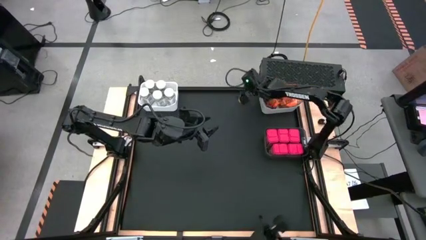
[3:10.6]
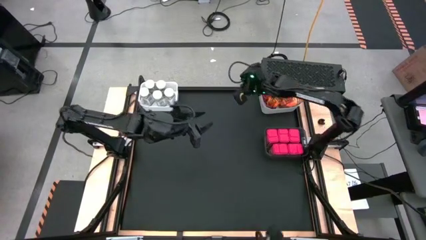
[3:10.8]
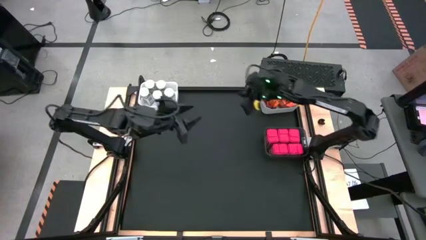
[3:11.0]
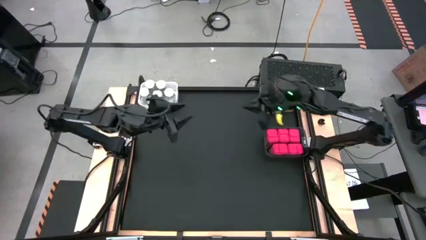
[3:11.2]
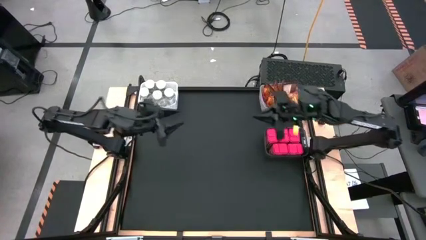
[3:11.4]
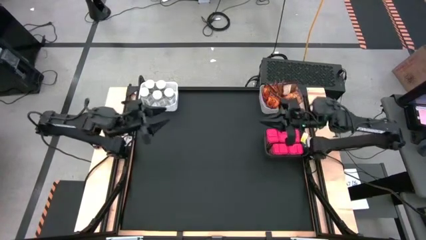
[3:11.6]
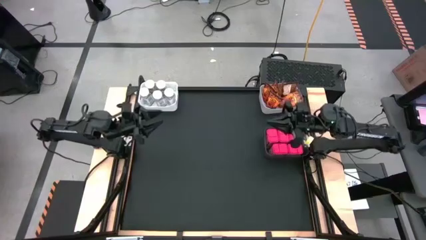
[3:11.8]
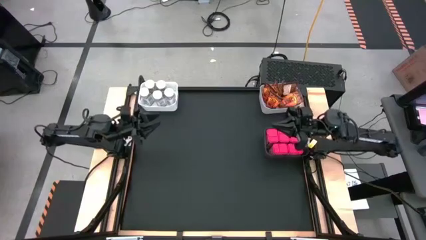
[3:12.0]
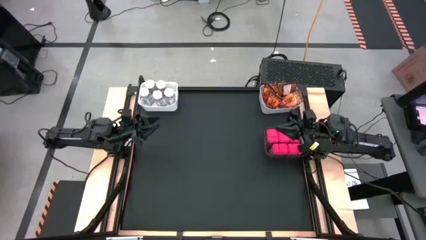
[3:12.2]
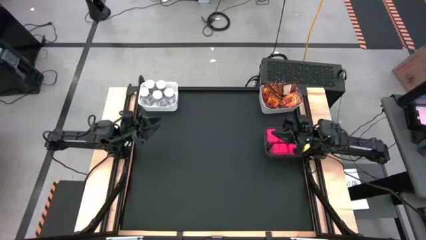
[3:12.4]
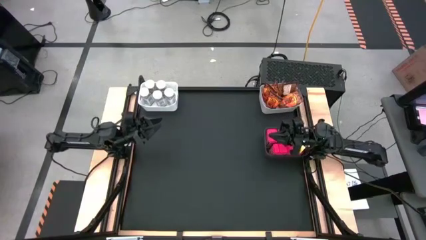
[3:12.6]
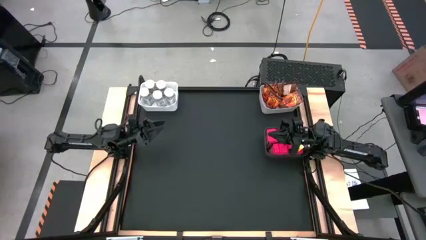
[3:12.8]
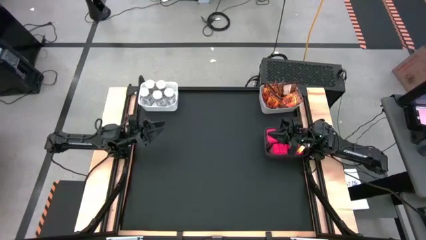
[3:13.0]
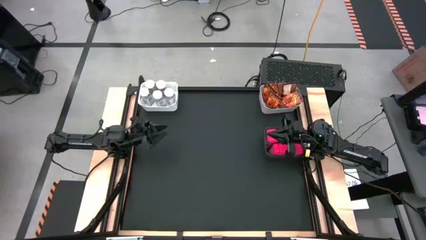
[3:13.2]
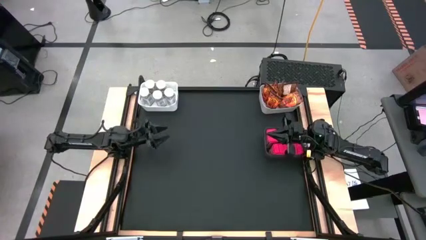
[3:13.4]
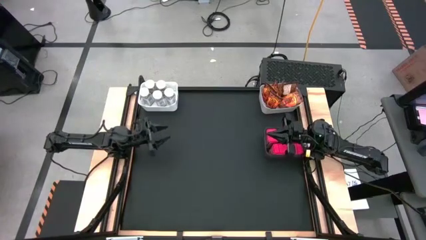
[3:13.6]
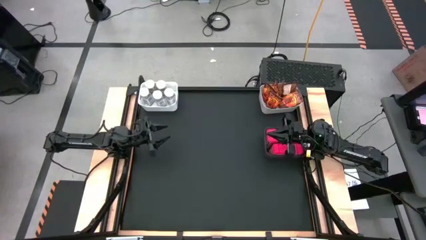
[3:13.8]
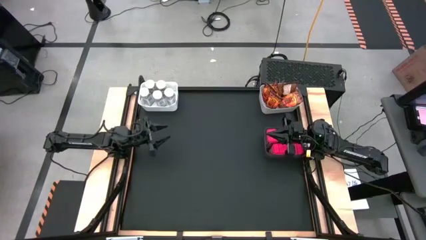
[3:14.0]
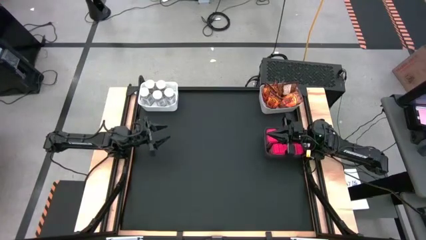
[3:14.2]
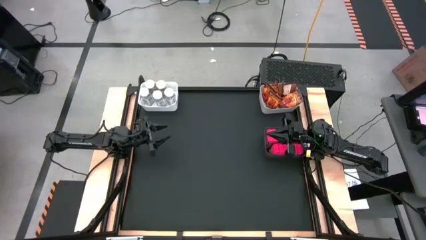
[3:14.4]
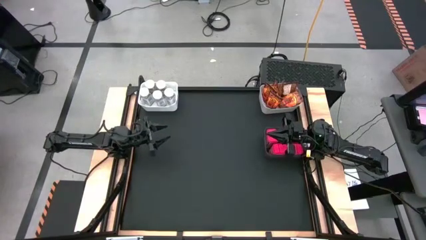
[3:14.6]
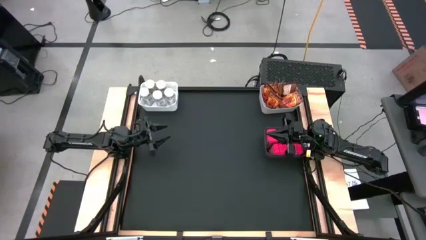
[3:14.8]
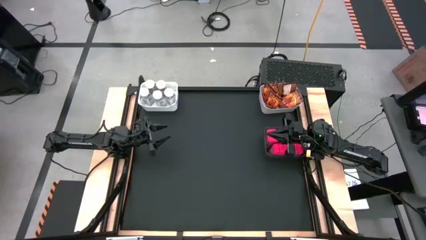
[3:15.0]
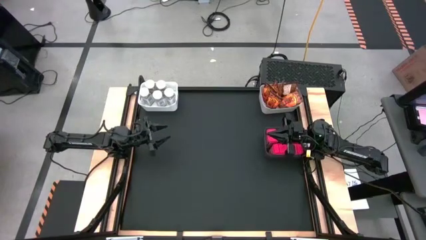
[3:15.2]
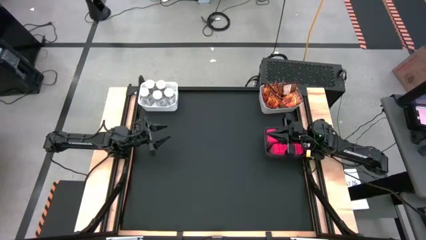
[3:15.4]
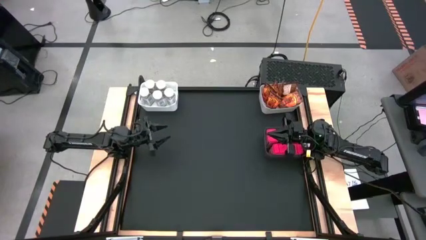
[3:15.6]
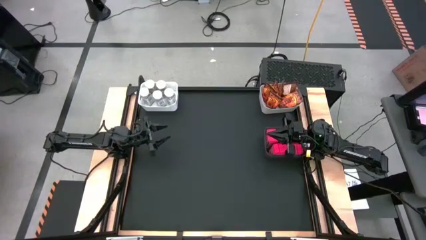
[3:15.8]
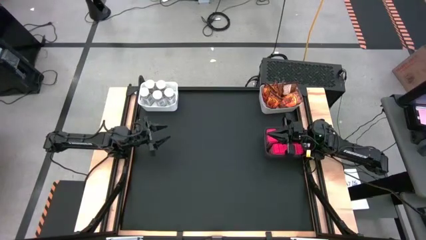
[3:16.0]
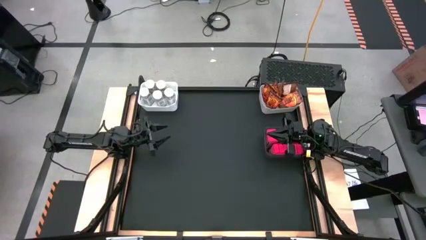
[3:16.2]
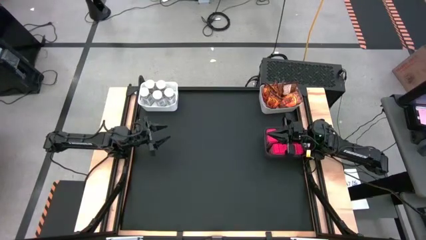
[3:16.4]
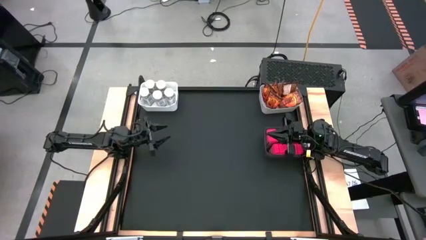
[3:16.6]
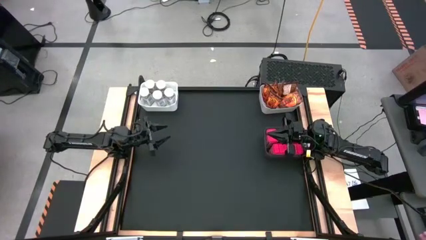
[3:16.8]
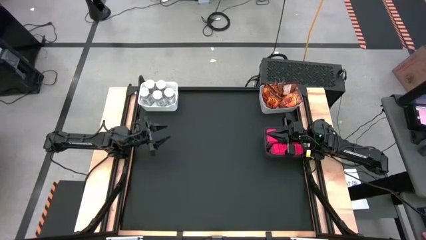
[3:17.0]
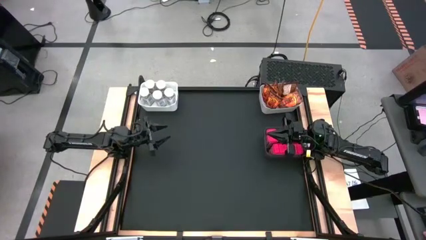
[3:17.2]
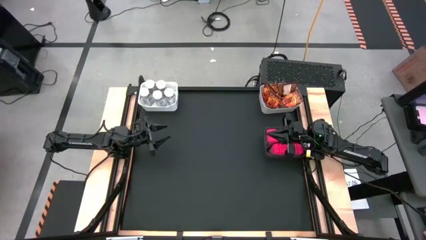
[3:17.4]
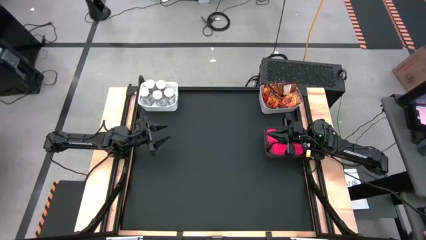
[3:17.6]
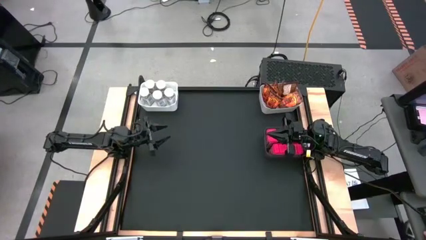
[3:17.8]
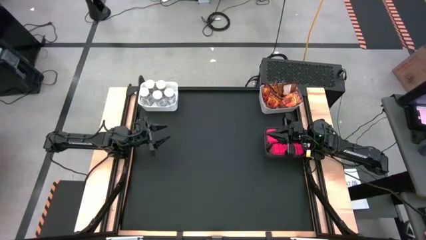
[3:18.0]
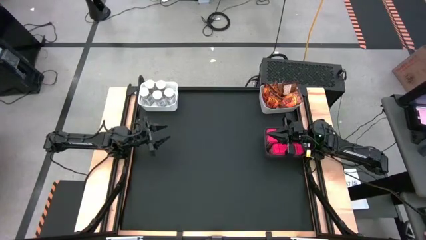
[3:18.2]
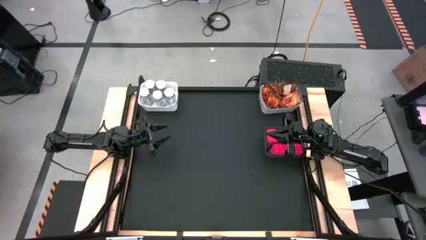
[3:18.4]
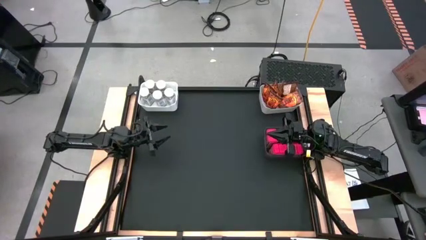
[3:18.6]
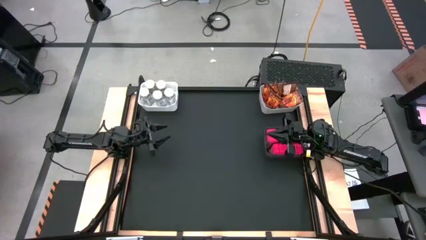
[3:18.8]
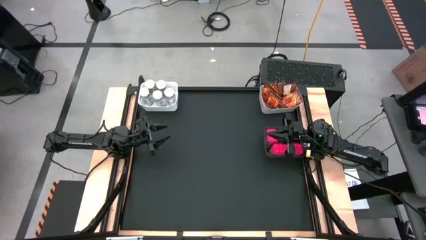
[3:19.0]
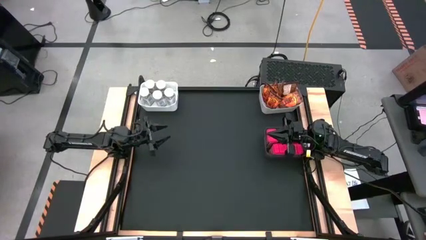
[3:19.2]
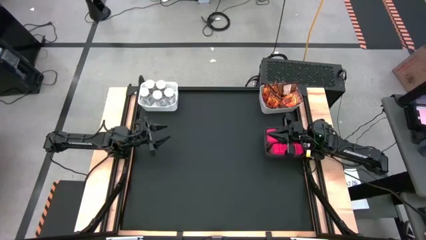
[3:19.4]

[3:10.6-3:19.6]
Task: Sort spices by type
Return to Home Position

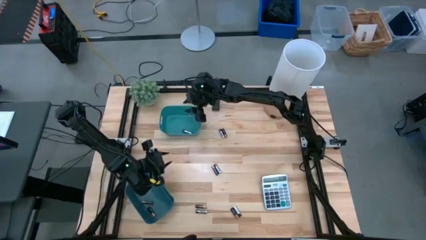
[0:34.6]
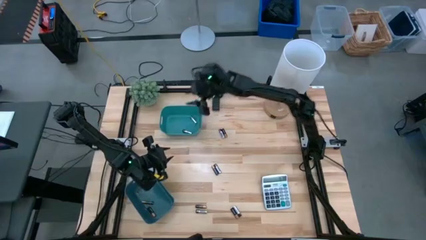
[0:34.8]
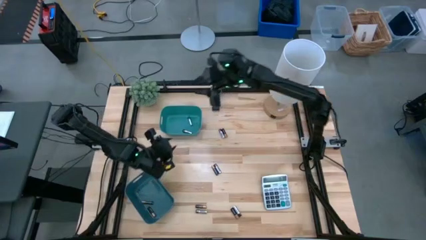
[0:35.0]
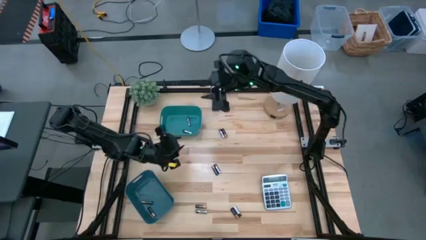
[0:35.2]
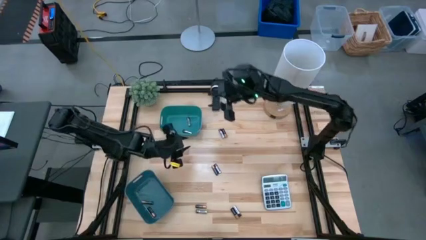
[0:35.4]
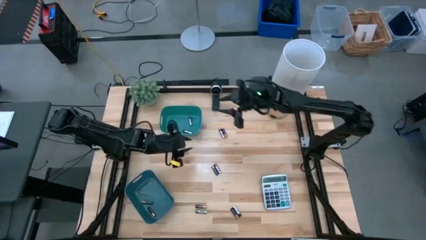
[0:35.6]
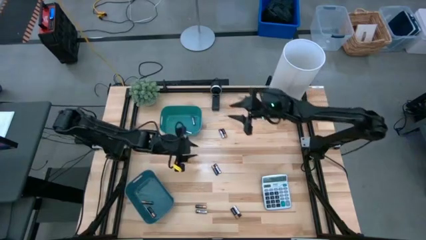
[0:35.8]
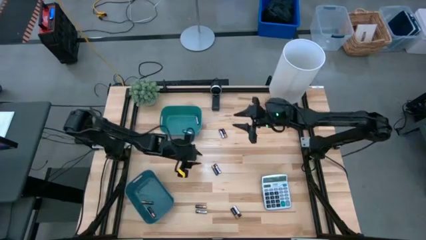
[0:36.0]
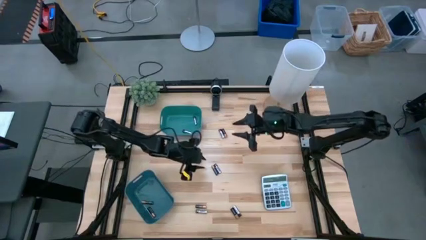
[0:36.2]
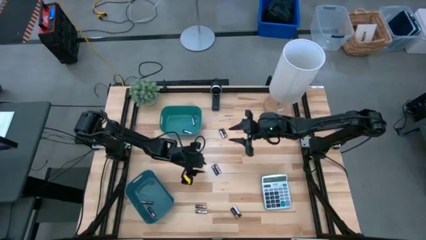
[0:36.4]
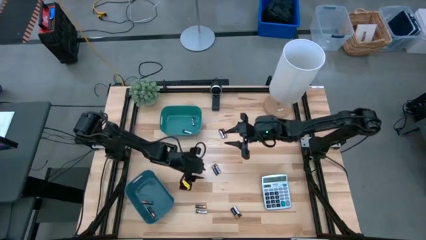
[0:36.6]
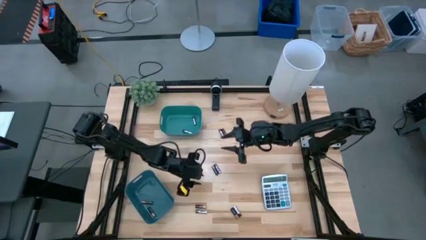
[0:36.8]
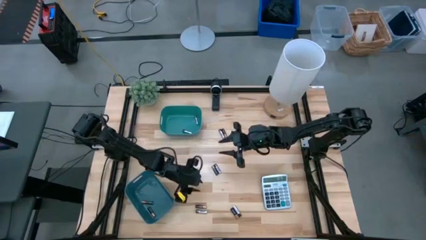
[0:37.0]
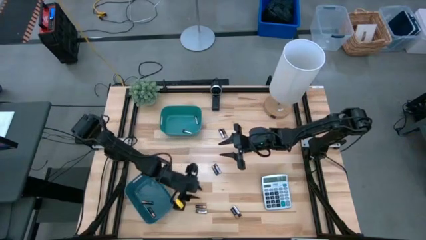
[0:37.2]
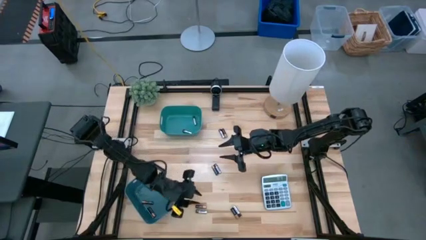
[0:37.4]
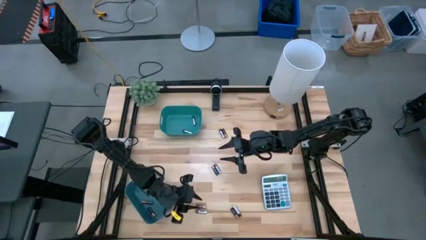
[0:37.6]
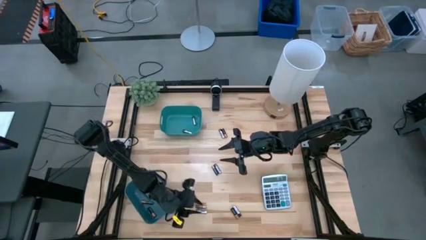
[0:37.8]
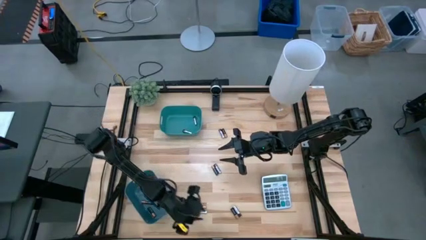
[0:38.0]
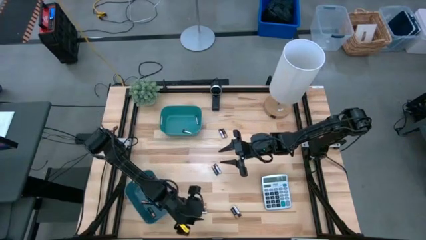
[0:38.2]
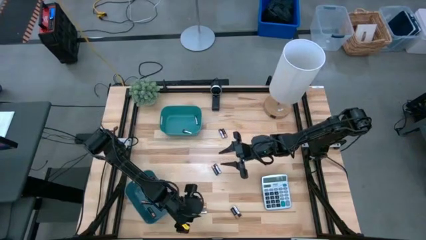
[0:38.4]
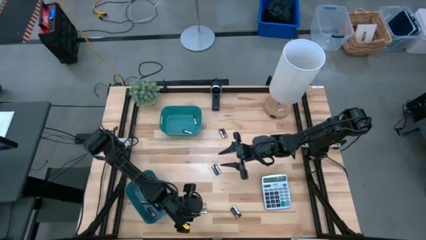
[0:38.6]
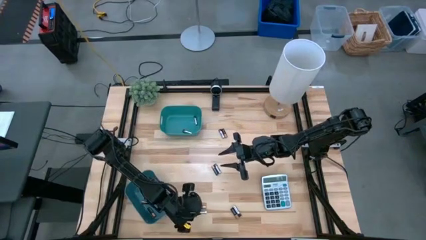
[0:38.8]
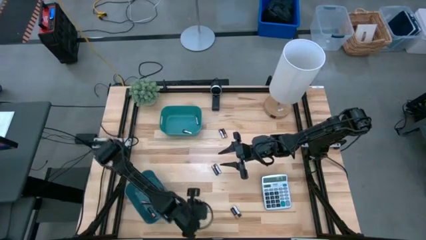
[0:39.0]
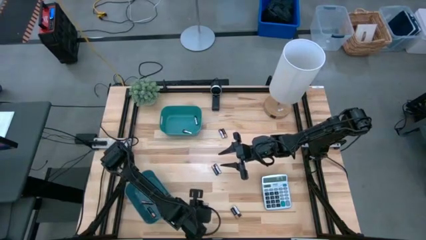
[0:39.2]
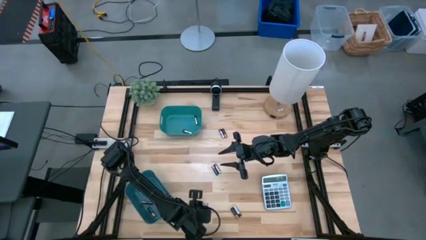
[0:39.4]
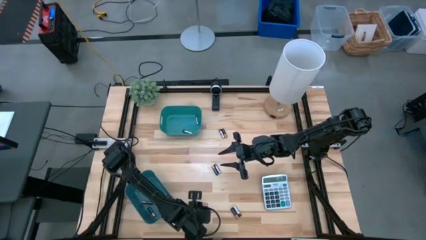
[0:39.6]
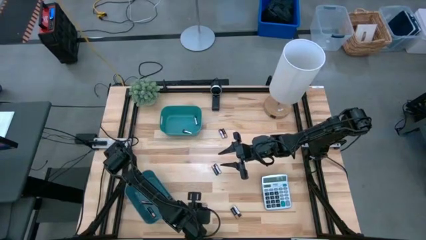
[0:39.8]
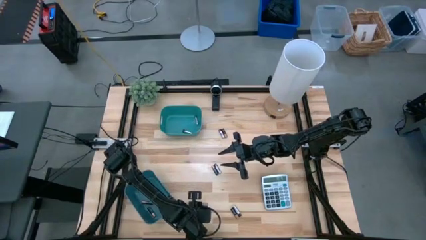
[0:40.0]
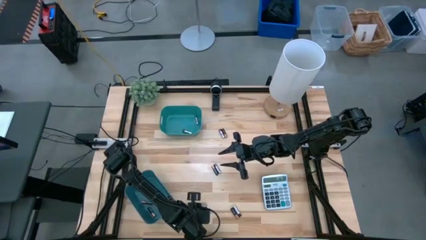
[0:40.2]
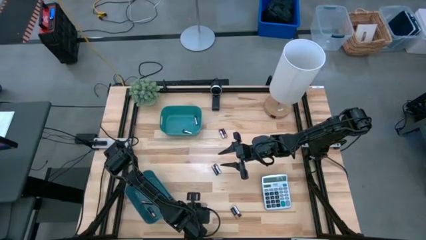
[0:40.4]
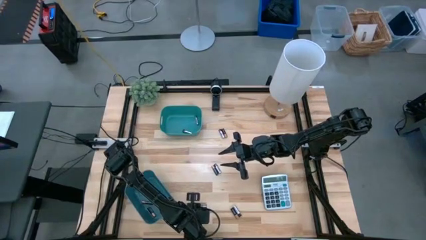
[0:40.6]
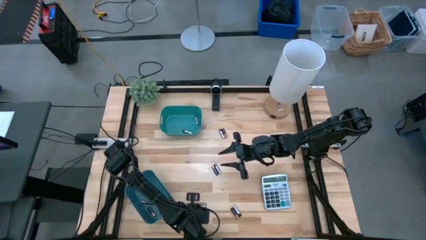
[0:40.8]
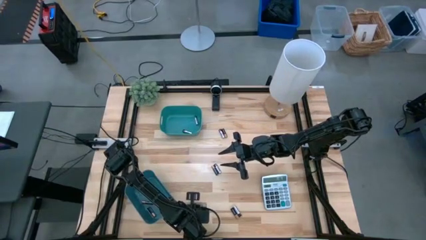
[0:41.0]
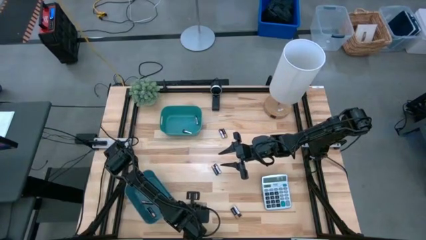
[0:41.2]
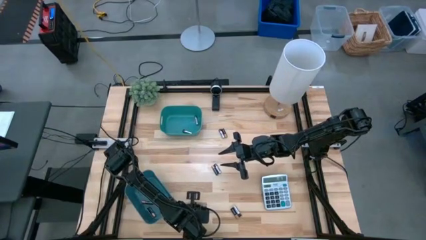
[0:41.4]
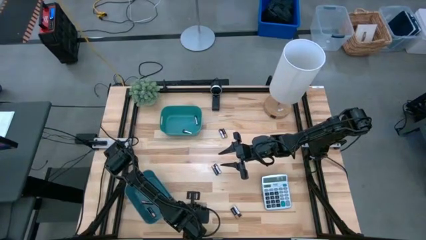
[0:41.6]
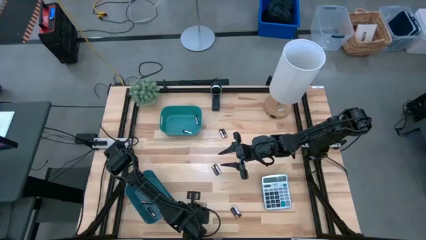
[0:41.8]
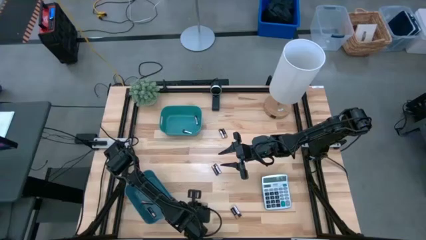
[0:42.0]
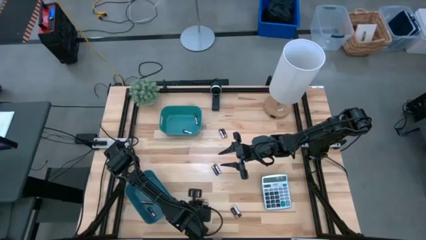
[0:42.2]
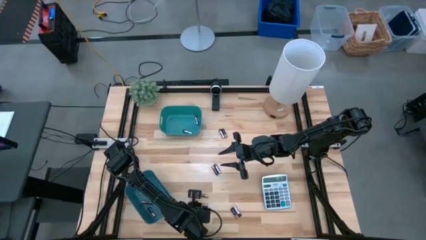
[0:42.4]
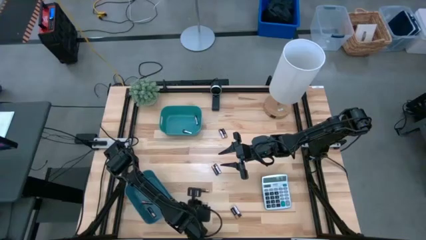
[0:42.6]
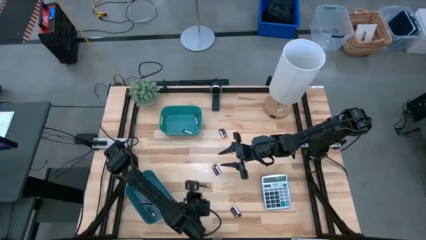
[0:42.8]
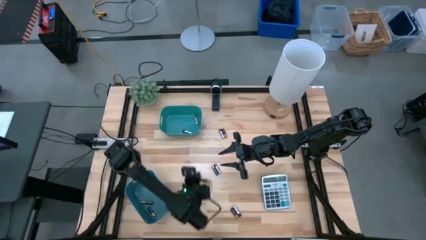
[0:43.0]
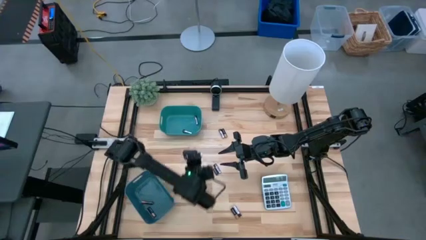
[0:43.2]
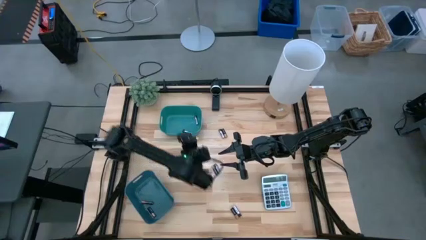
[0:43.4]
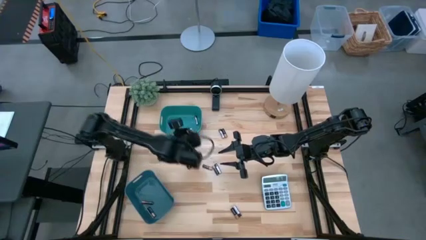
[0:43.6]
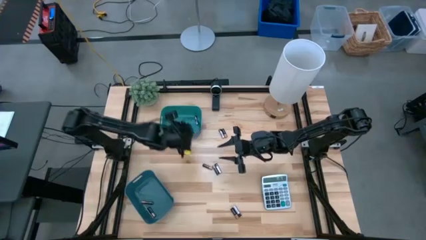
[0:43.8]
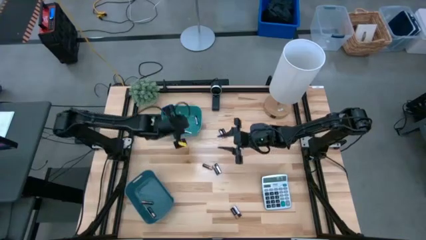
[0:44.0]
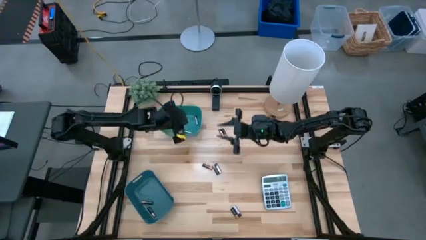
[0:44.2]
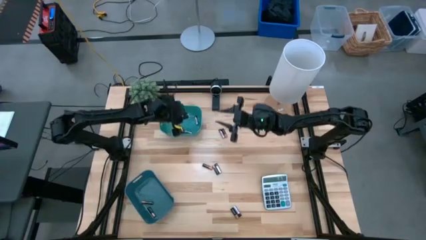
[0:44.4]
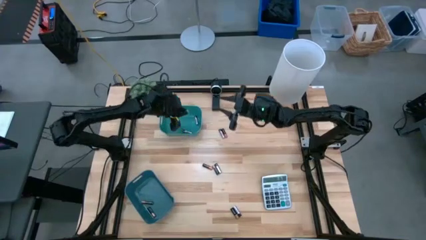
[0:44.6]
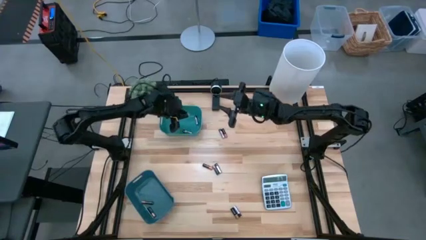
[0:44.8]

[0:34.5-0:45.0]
Task: Sort batteries
Put the silver battery into the green bin
